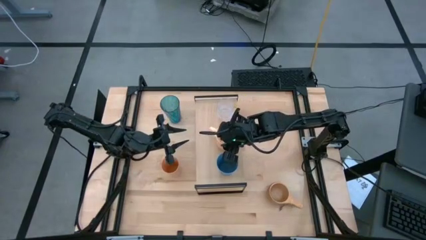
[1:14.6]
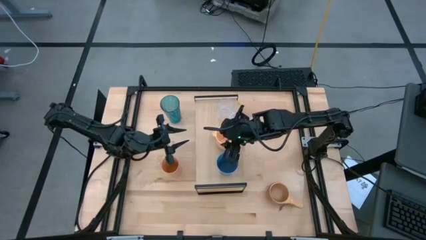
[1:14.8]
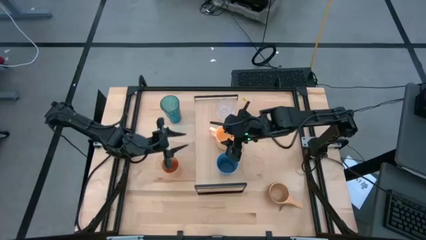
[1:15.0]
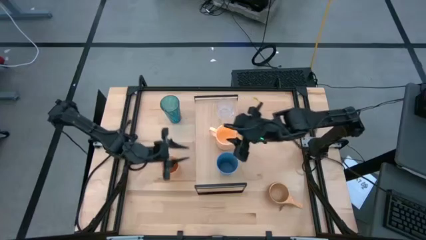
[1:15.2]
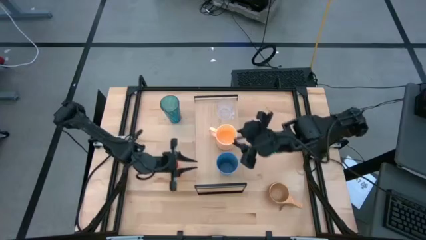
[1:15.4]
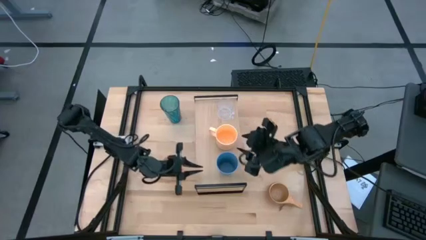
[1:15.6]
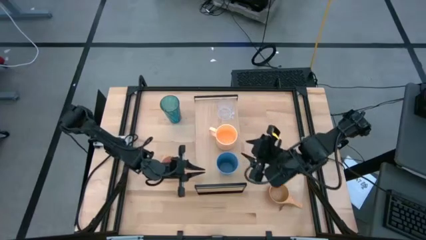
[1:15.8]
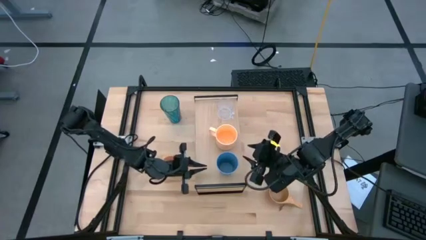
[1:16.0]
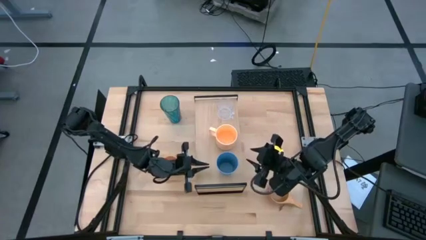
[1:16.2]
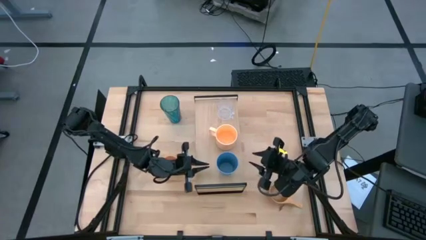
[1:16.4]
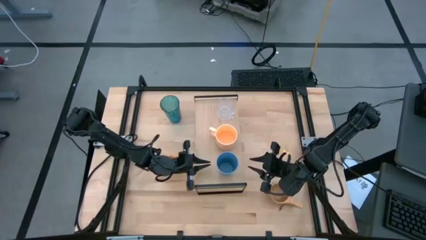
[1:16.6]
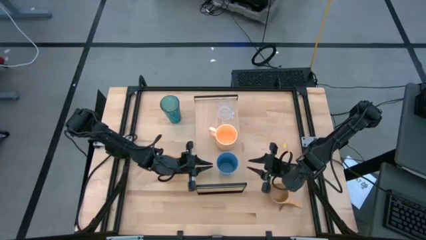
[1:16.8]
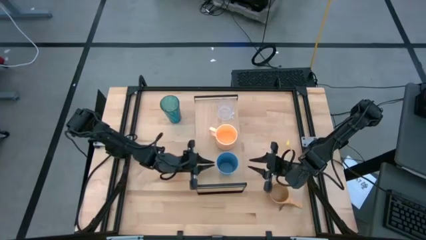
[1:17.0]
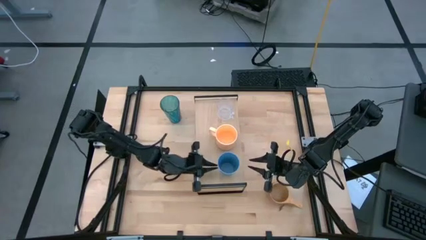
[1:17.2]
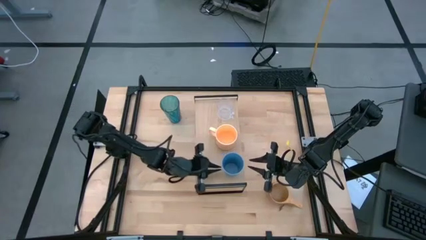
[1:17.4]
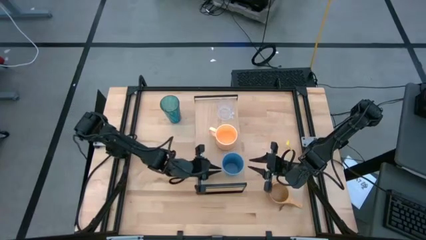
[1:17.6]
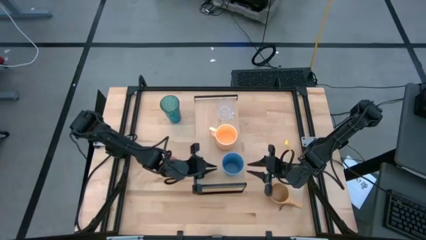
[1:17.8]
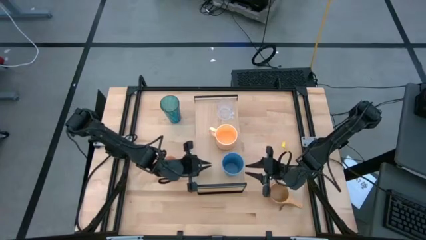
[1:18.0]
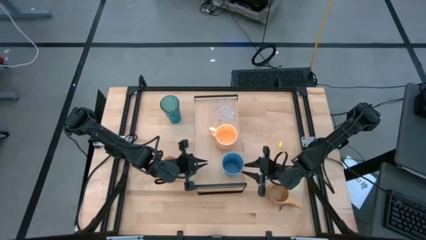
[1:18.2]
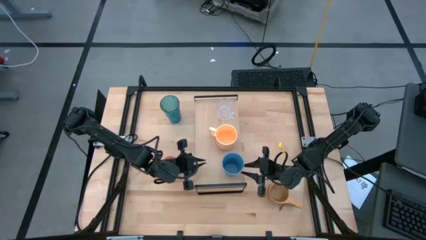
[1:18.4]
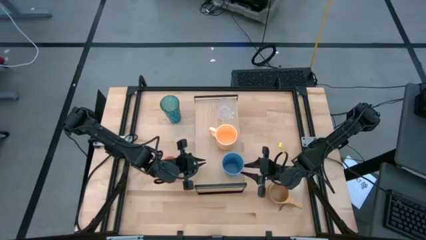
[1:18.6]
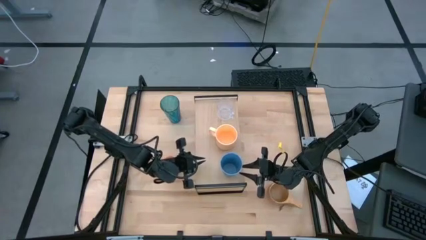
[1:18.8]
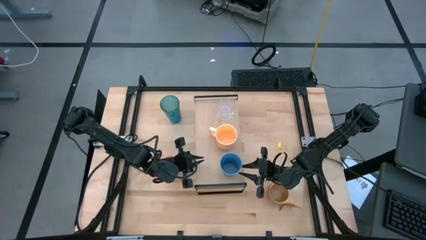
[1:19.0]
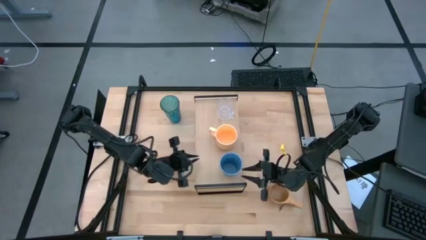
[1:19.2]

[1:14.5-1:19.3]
Task: Stack small to large cups/mugs on shelf
Adjust the light blue cup on the shelf

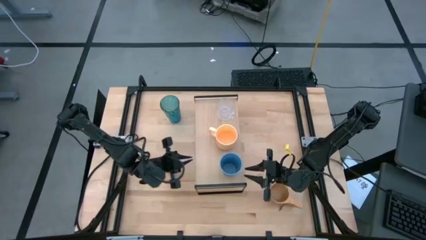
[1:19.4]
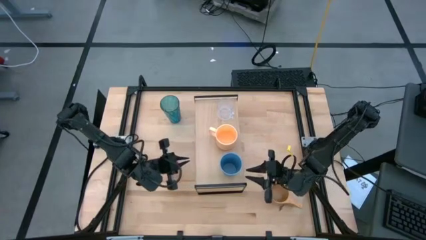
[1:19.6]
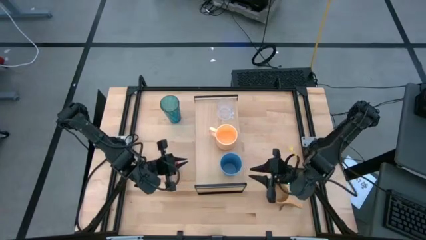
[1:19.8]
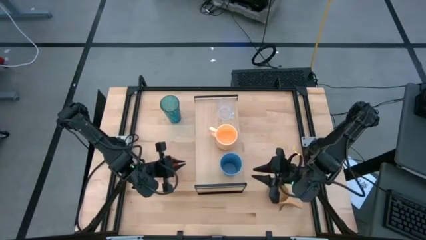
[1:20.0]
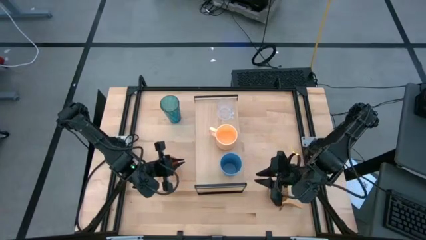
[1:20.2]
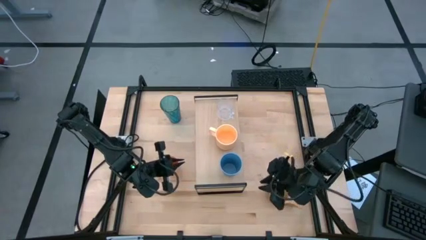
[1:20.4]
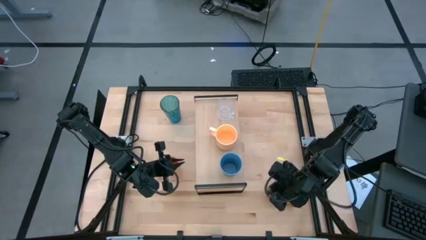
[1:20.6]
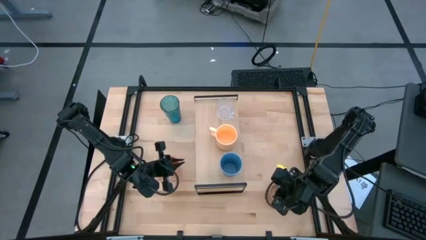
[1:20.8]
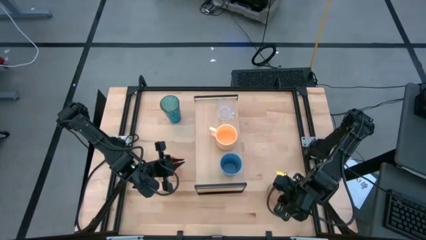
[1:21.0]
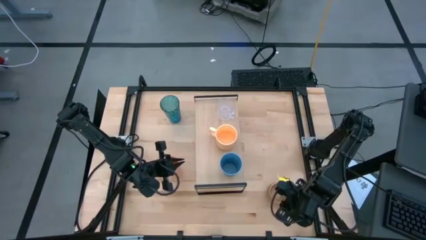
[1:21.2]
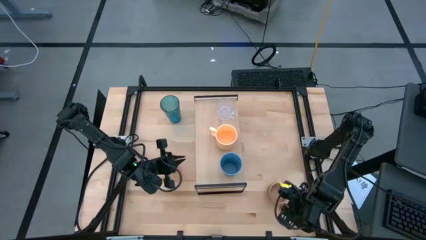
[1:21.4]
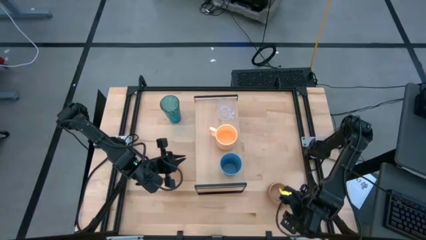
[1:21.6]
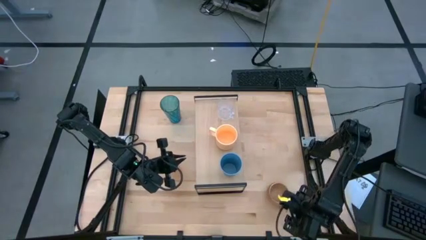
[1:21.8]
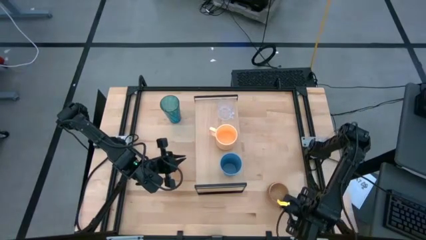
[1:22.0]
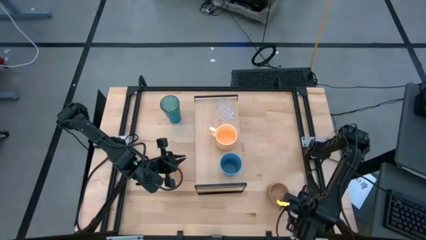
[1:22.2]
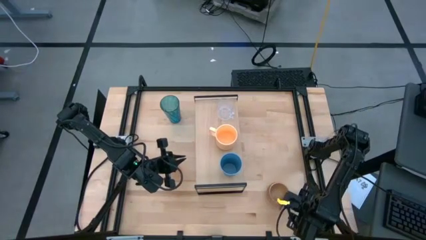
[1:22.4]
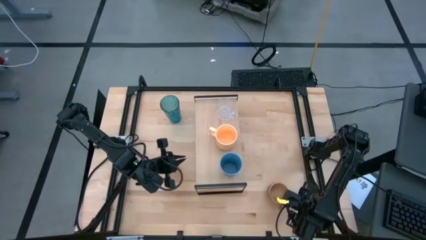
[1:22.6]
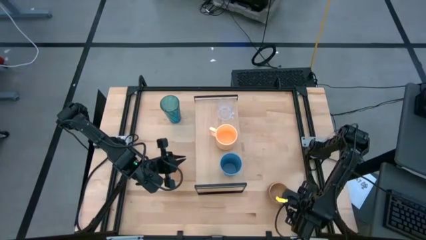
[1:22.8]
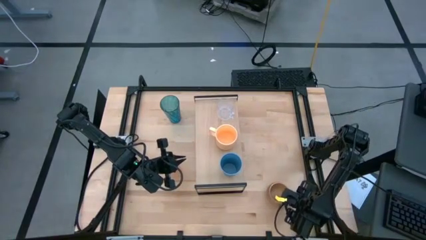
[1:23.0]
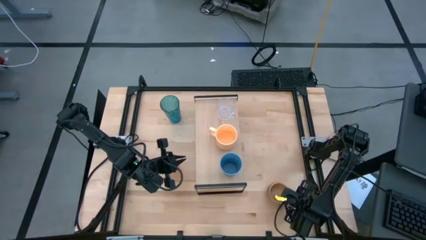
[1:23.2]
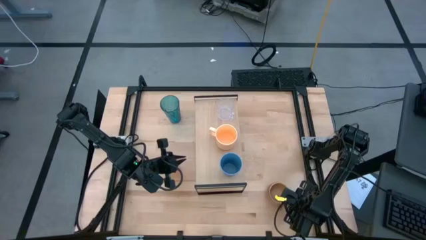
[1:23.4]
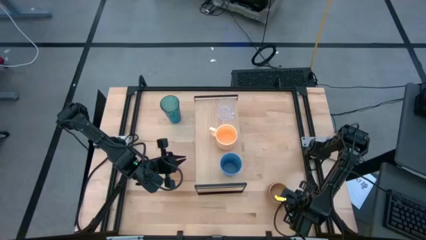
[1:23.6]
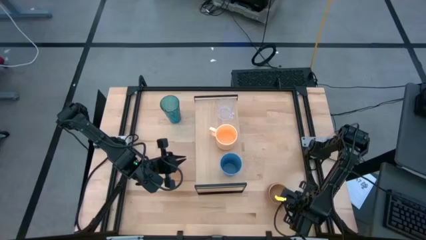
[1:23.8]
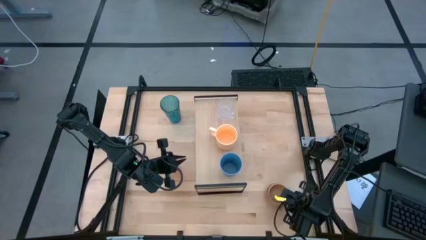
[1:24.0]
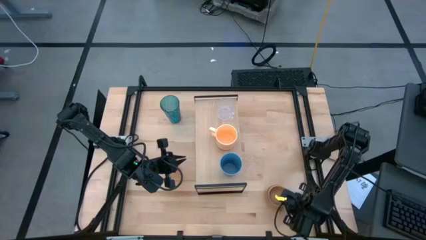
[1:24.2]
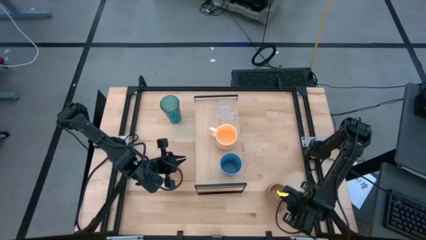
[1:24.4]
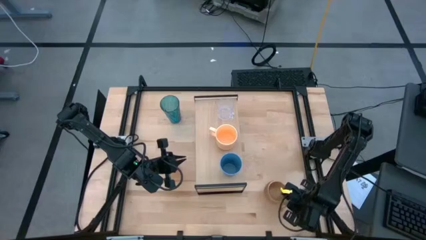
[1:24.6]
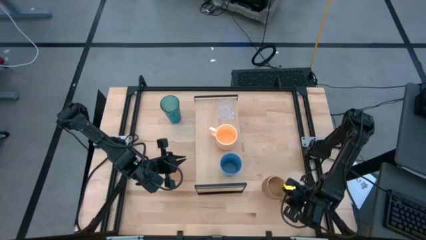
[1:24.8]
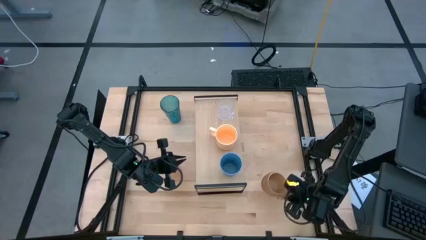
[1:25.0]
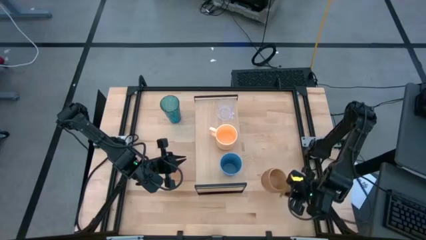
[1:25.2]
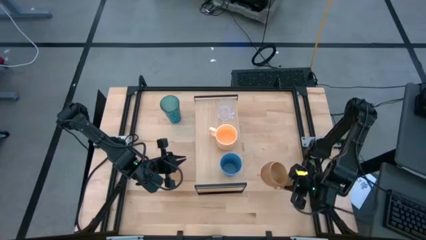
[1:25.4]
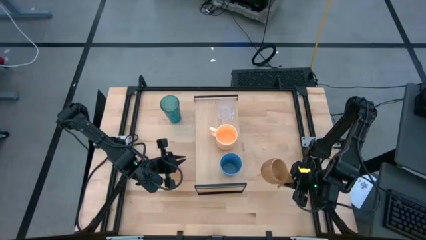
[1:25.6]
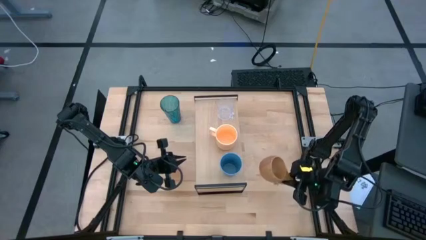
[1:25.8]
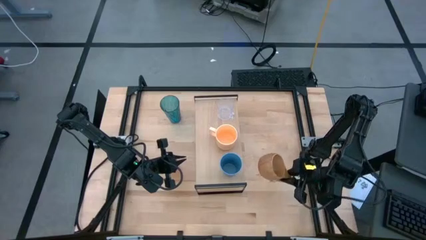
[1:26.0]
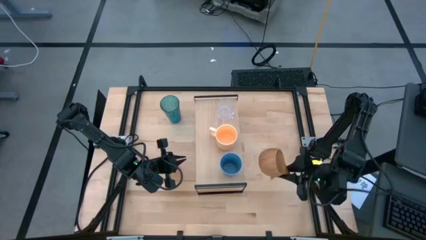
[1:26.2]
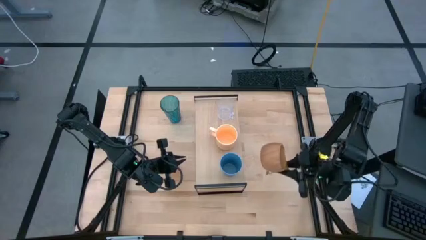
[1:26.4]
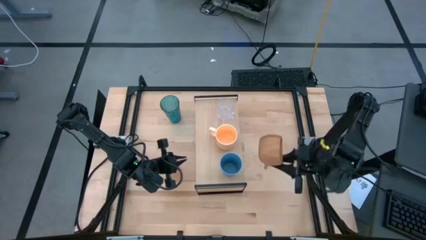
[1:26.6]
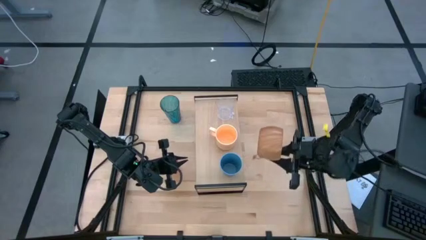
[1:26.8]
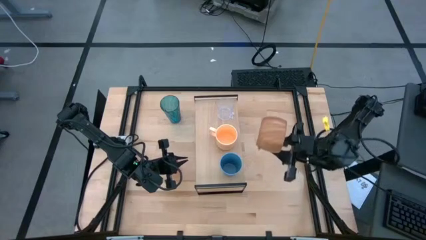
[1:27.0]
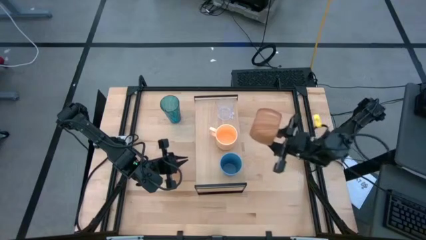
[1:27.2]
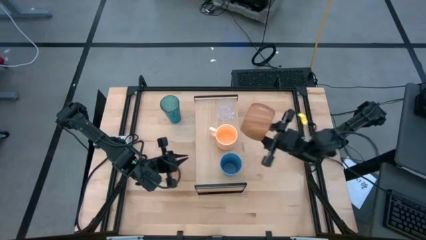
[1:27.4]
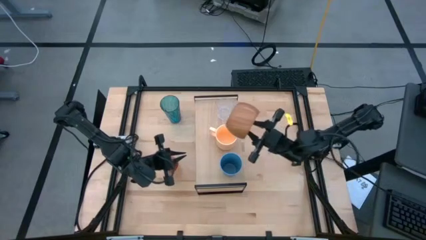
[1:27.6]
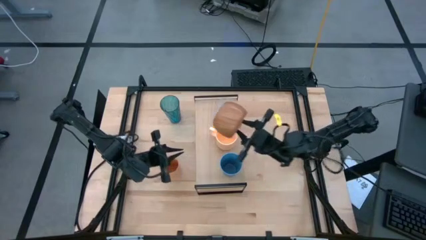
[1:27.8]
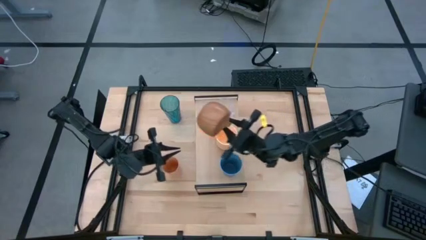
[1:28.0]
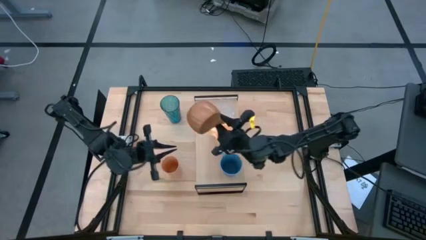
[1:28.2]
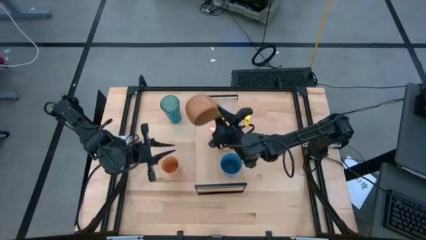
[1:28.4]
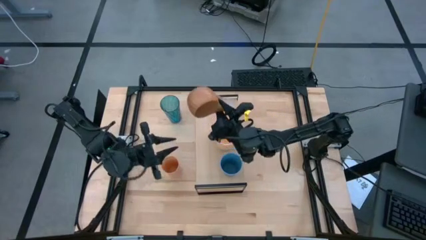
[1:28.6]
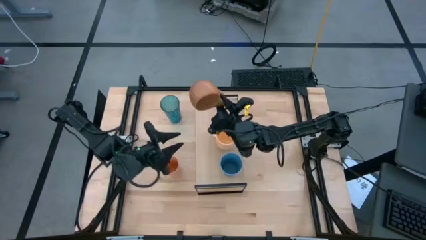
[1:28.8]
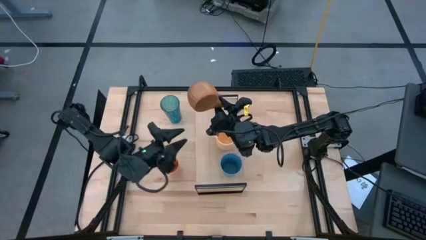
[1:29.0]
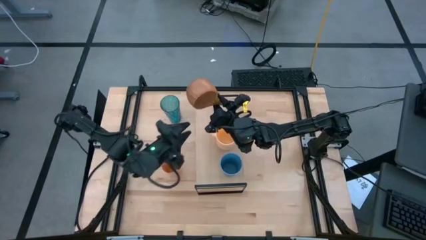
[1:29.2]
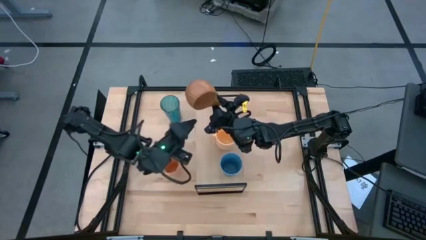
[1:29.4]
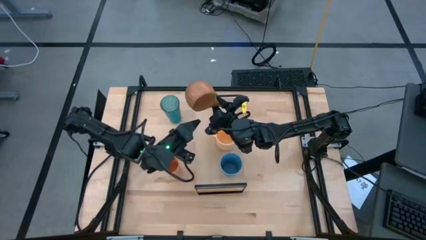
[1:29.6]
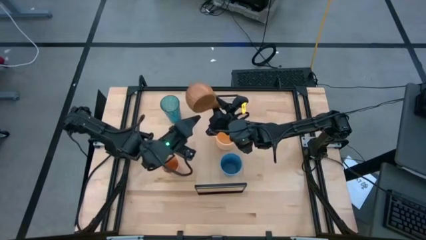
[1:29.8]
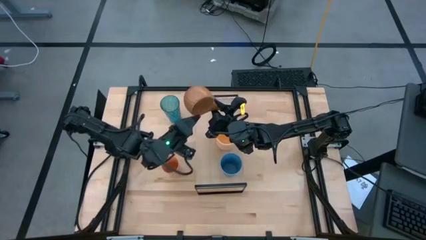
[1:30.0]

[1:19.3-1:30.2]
Put the brown cup on the shelf
